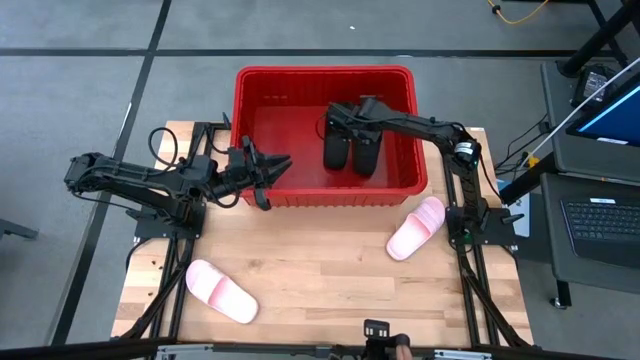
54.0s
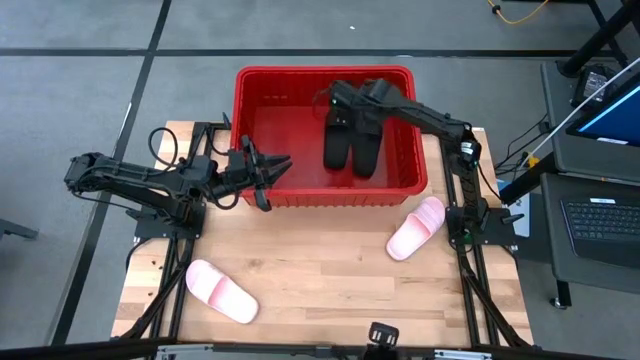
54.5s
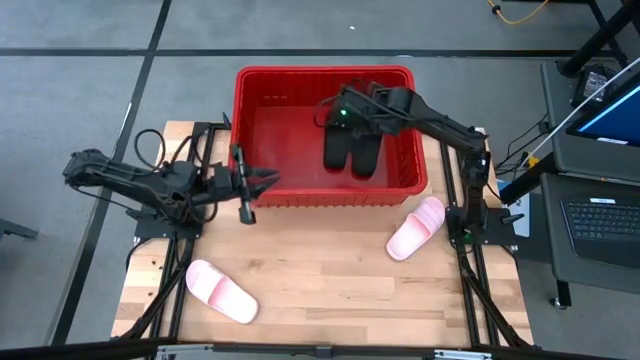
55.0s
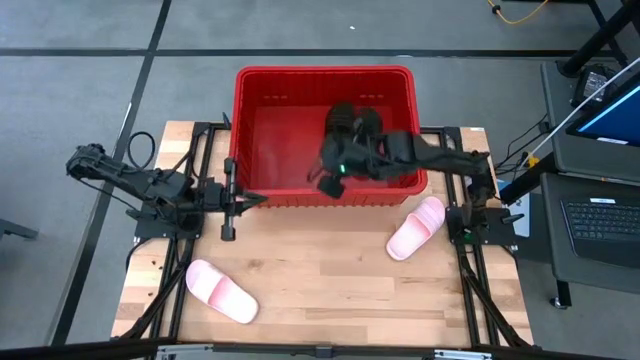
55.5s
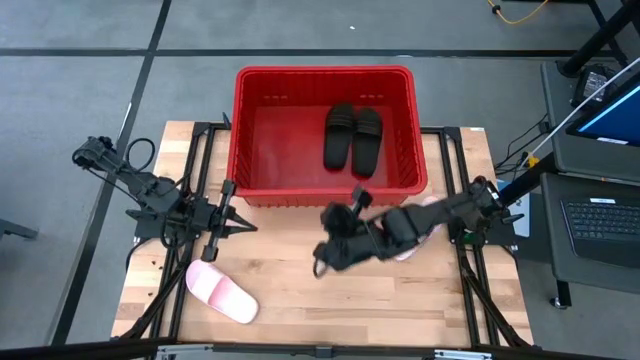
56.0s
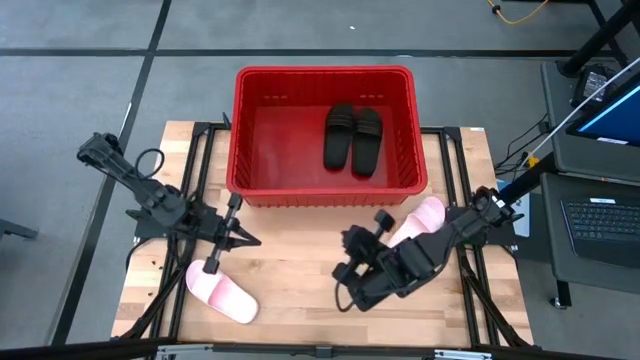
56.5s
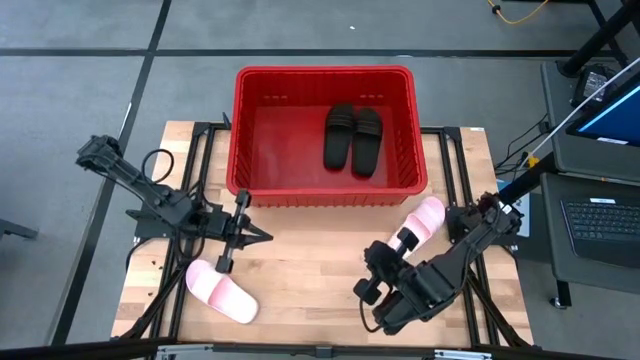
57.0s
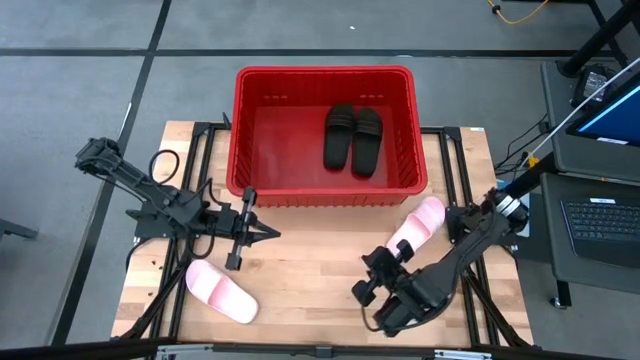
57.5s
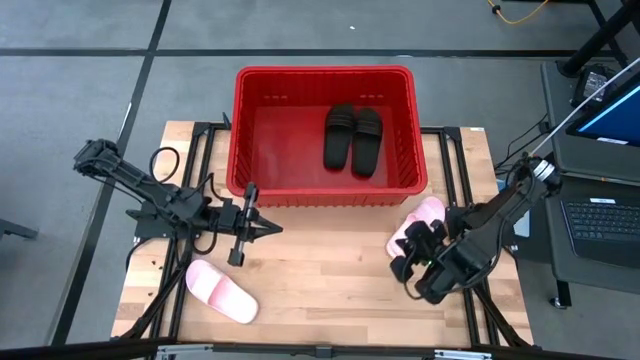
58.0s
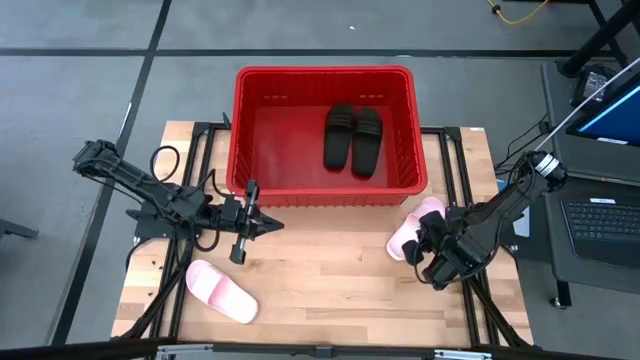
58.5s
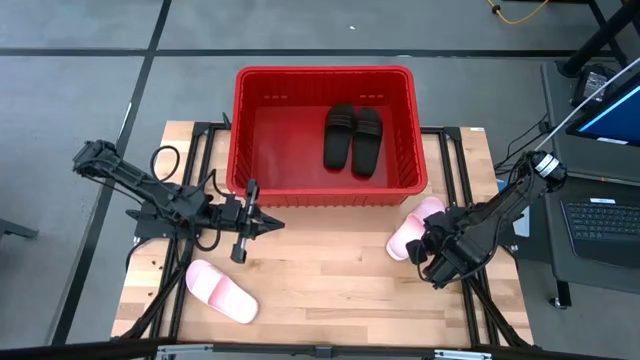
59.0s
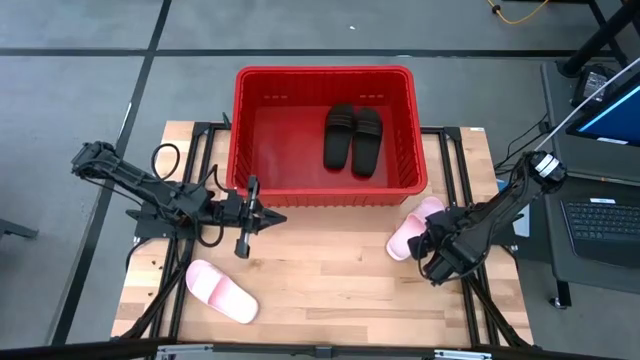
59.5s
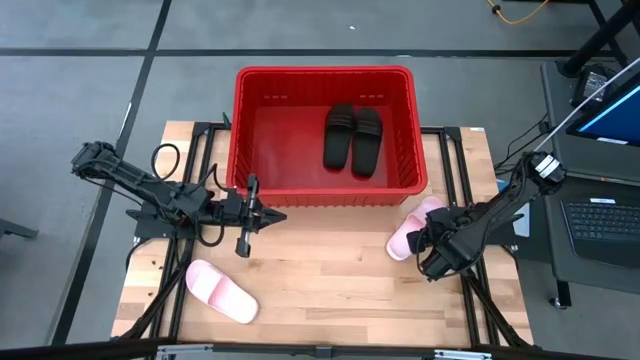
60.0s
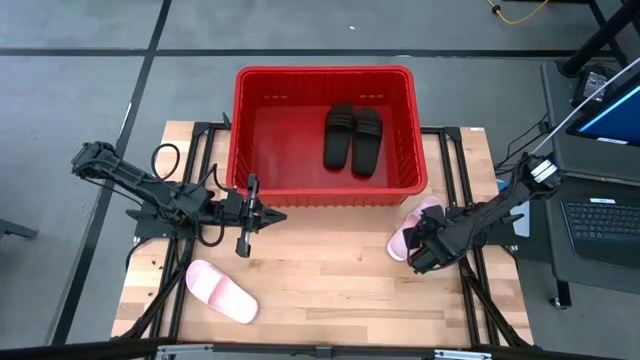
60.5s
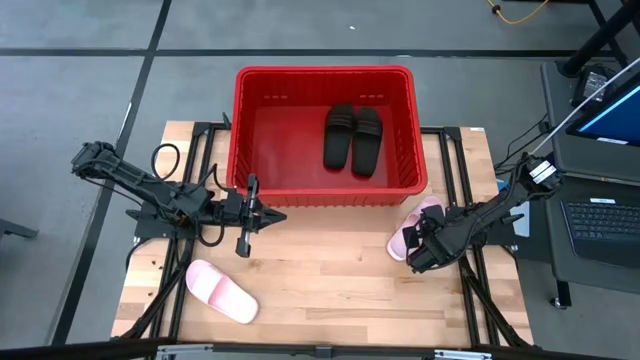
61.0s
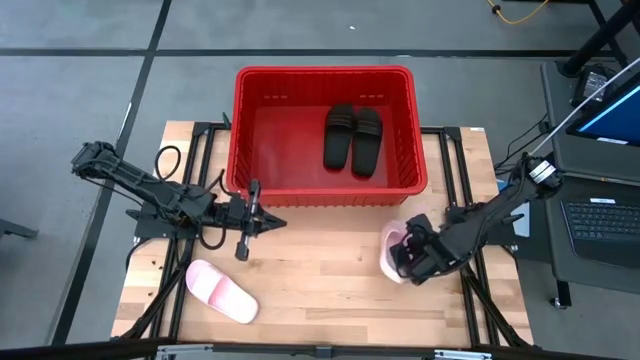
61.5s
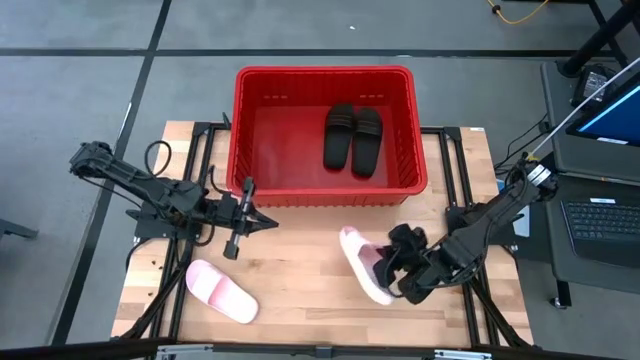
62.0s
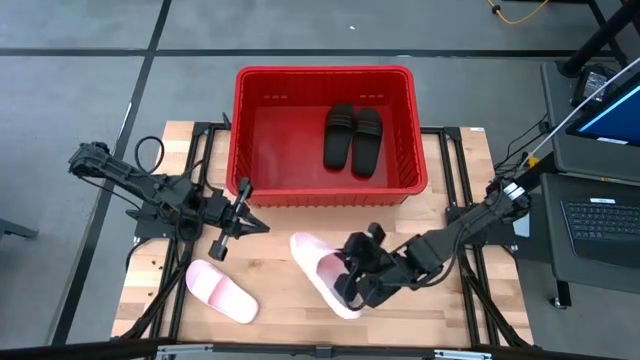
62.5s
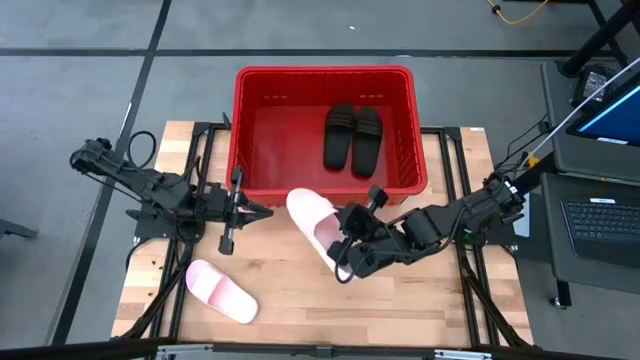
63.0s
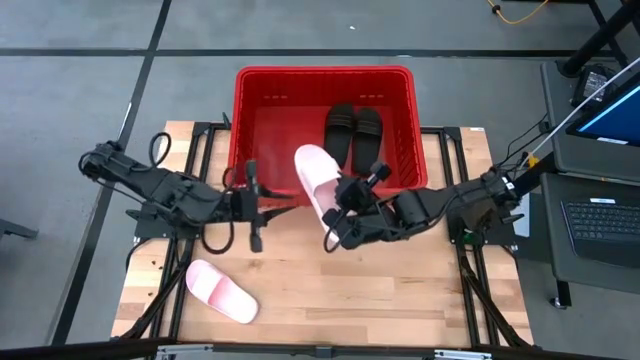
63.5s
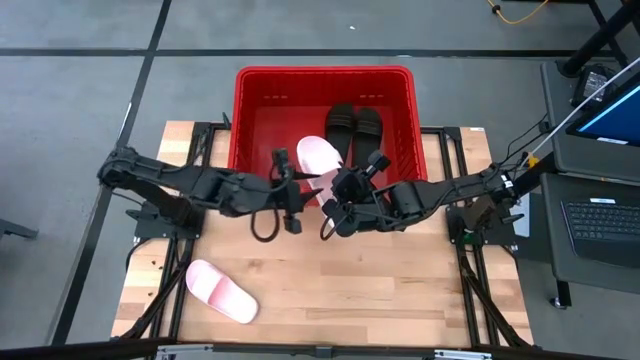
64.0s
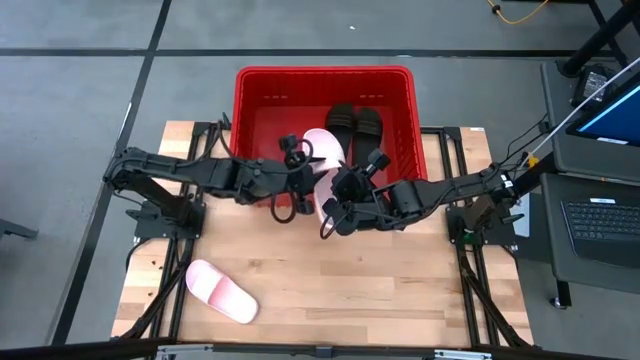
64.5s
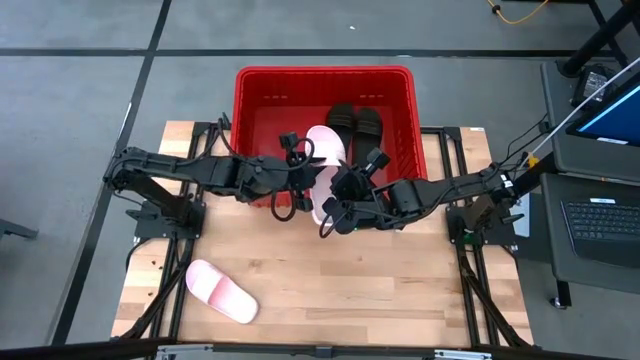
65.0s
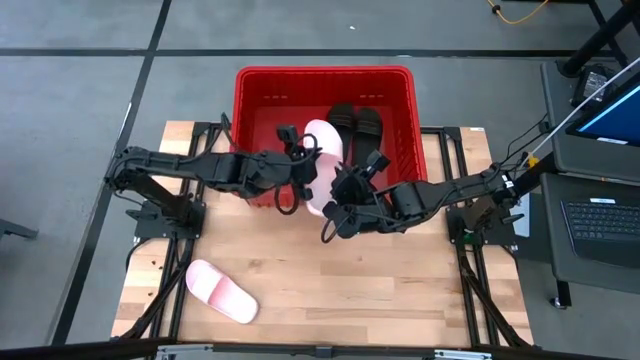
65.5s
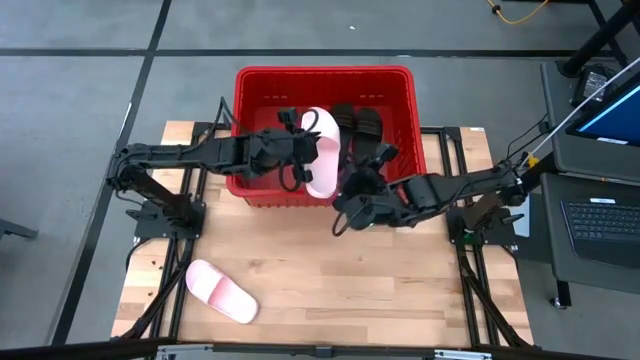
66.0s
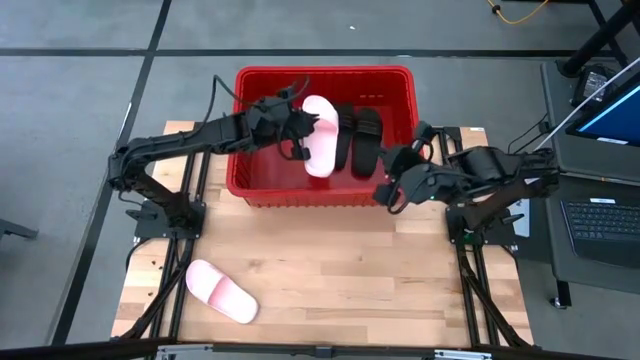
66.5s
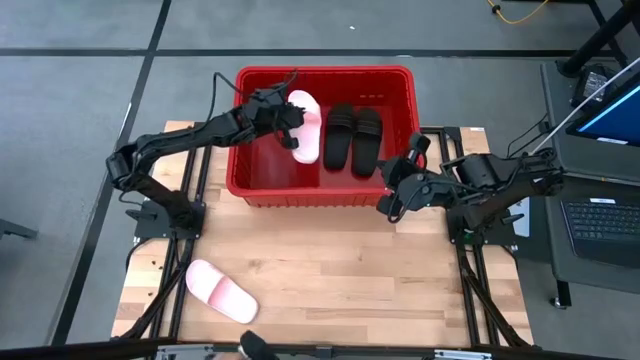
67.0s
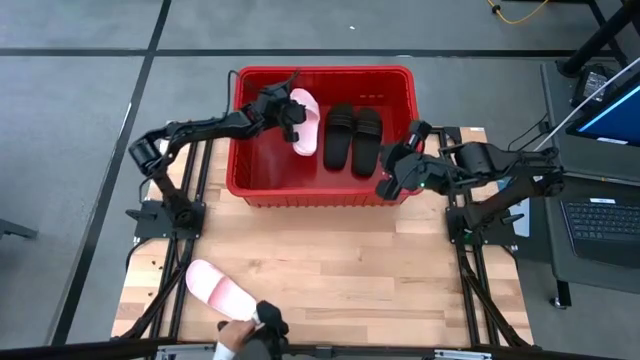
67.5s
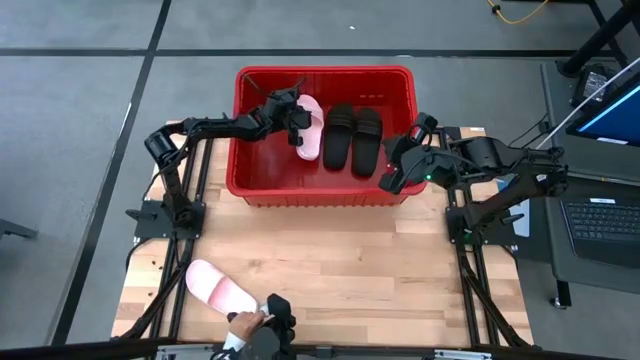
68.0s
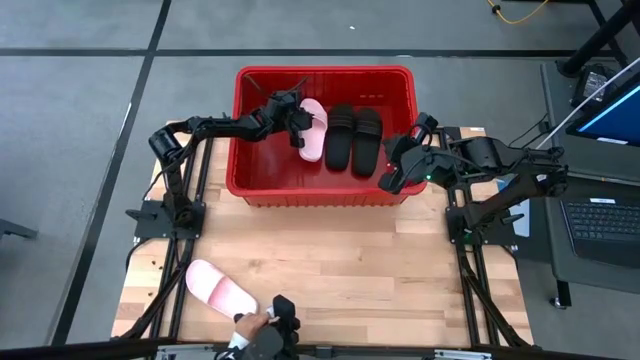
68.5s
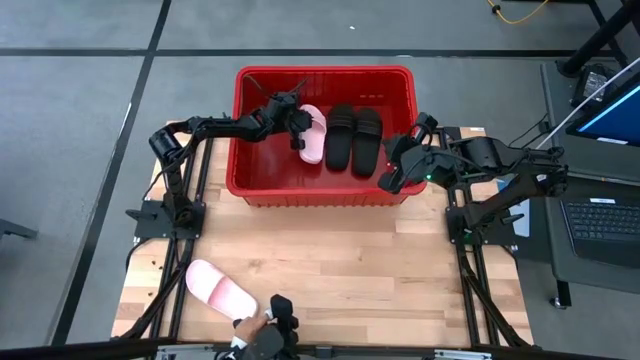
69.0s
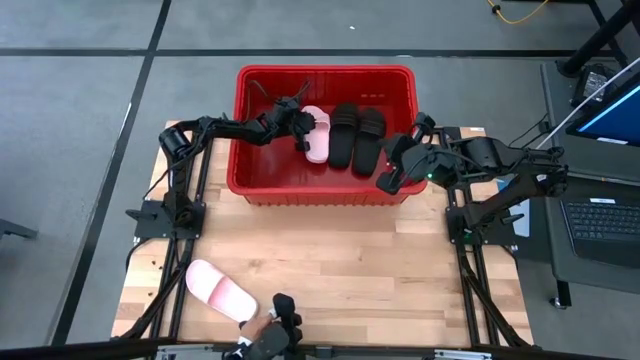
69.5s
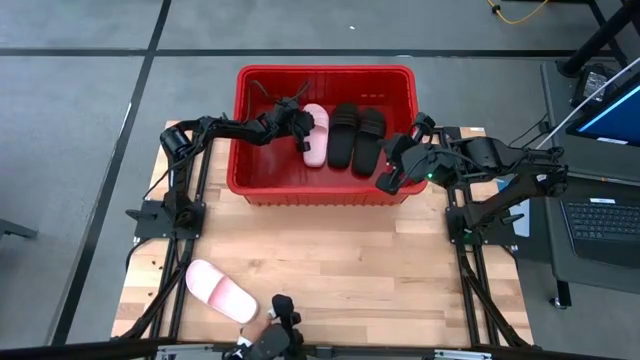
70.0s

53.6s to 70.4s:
Task: Pick and place slides into bin
Put the right pink slide into the red bin

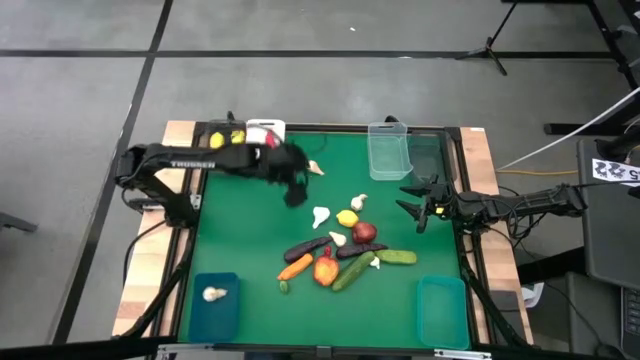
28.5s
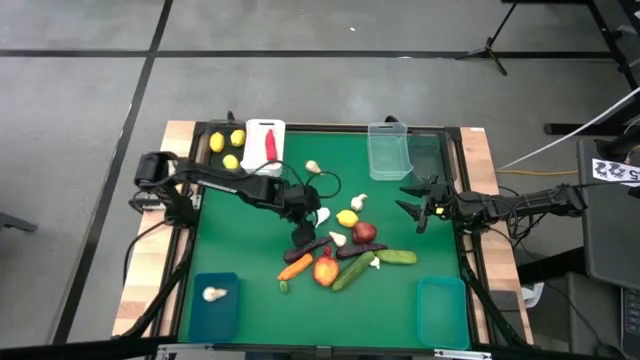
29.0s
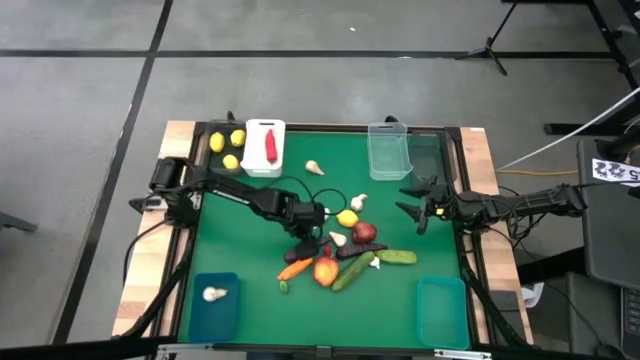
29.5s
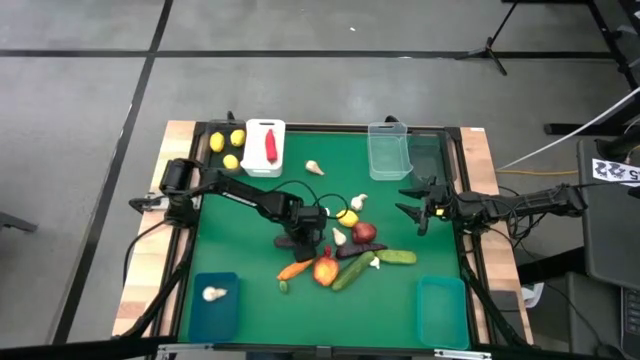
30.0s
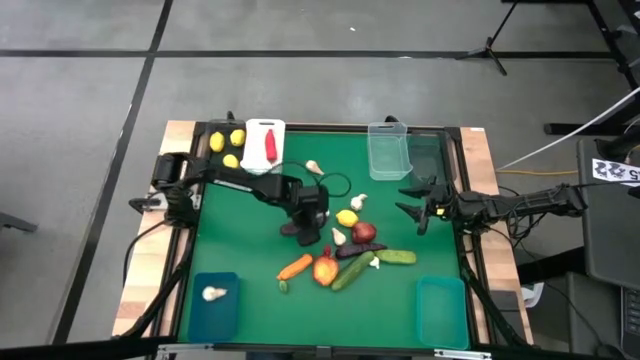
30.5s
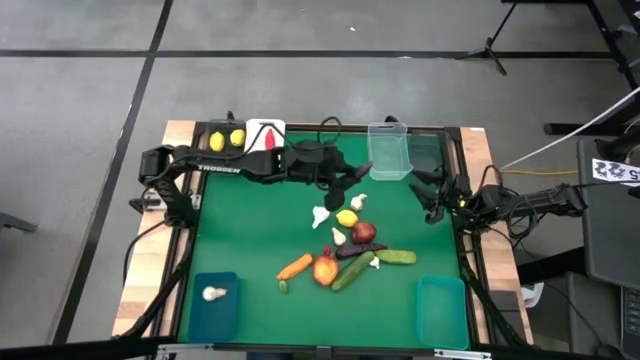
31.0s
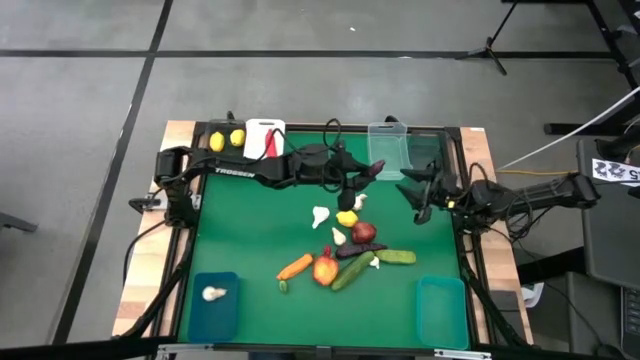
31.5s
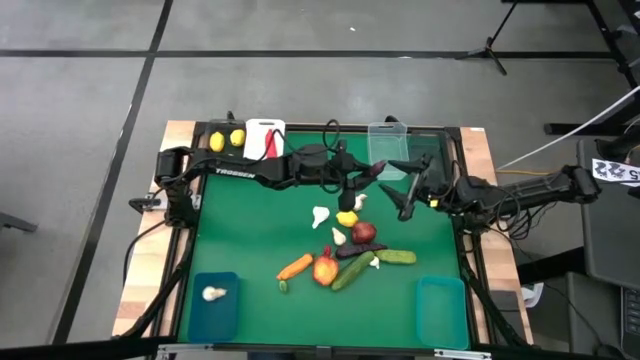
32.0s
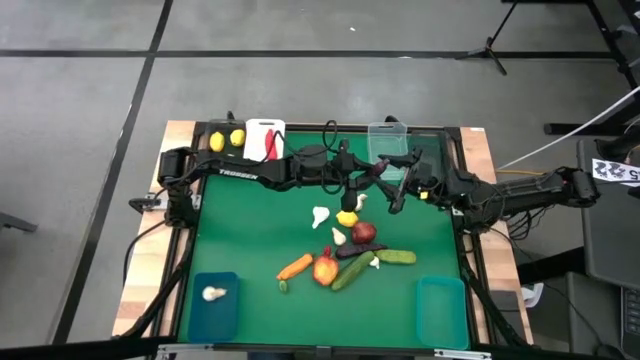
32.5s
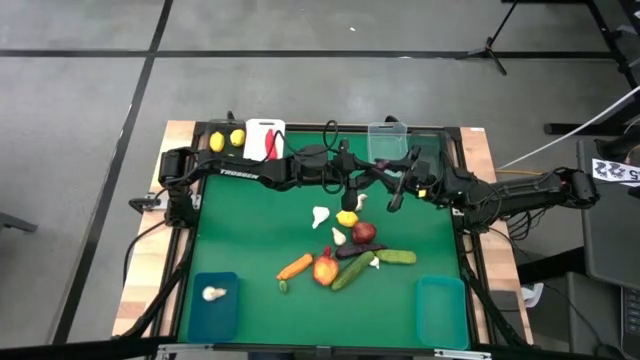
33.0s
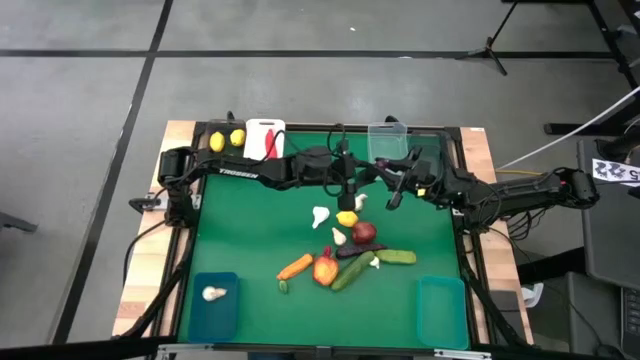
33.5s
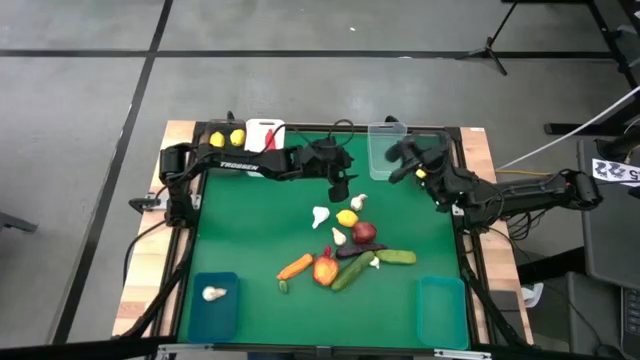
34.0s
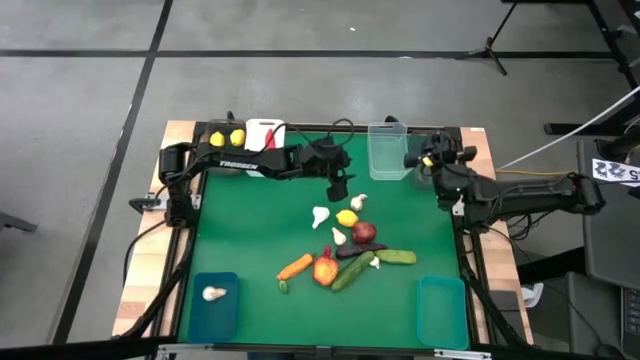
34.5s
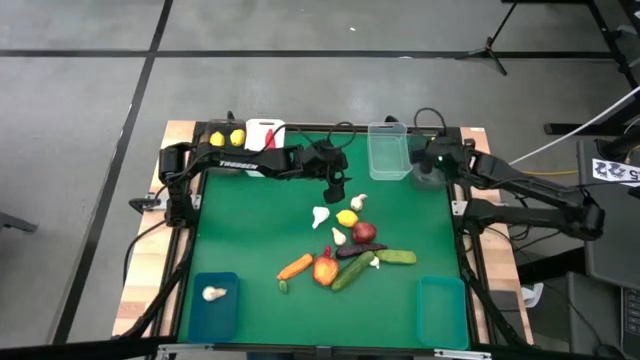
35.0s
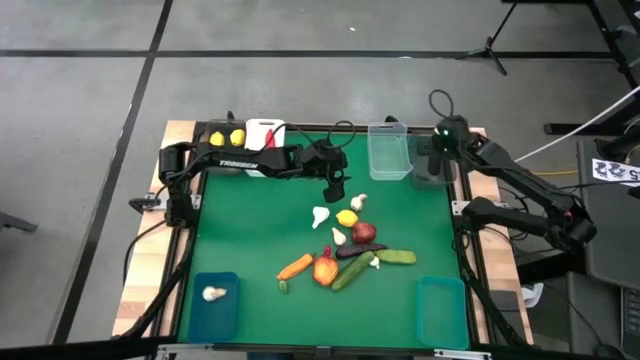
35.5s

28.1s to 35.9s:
Task: Sort produce into baskets
Put the eggplant into the right black bin
